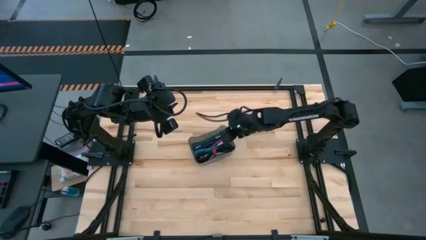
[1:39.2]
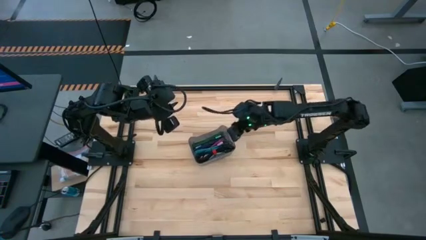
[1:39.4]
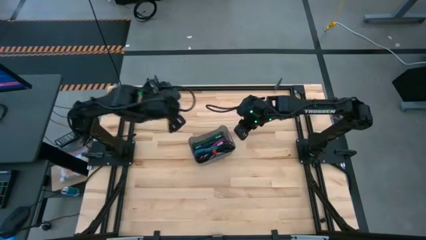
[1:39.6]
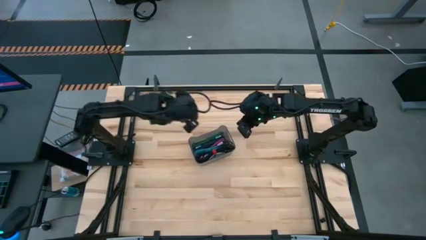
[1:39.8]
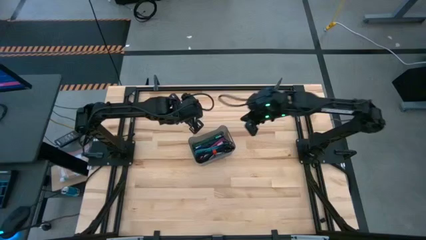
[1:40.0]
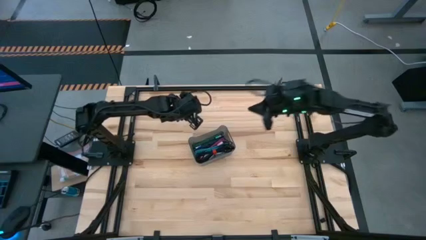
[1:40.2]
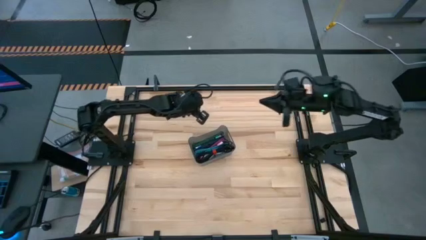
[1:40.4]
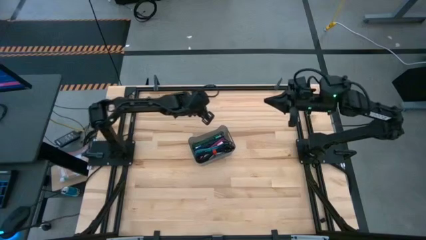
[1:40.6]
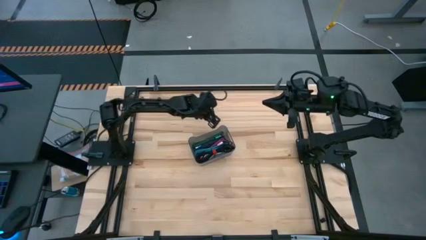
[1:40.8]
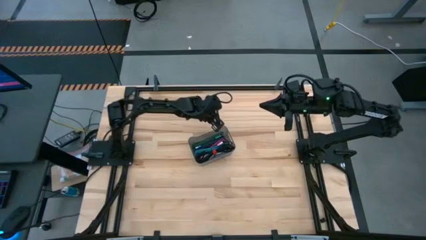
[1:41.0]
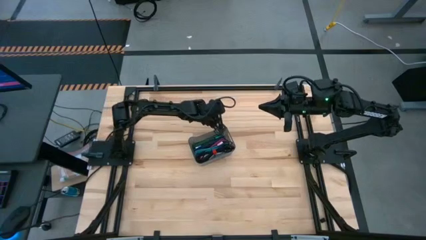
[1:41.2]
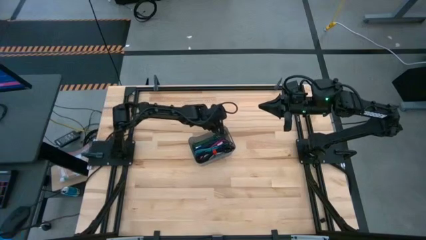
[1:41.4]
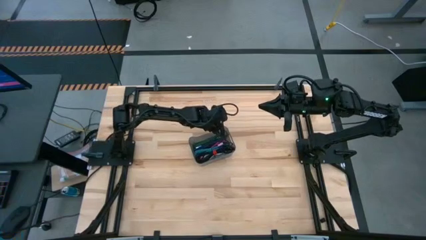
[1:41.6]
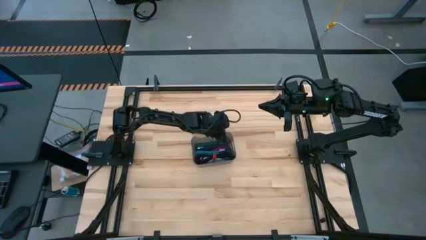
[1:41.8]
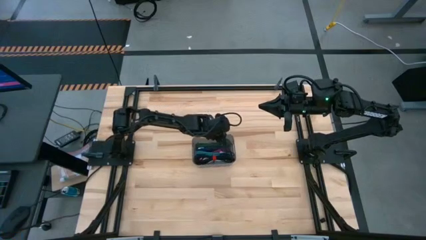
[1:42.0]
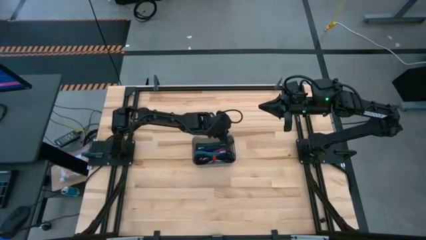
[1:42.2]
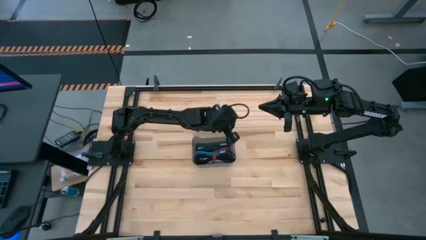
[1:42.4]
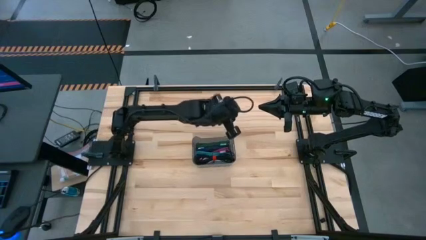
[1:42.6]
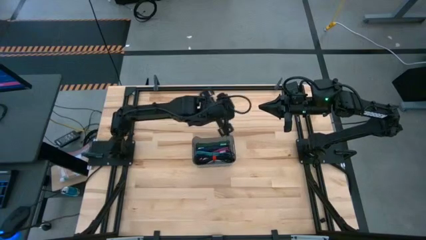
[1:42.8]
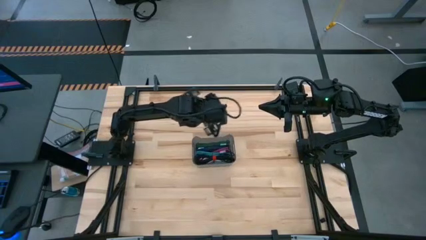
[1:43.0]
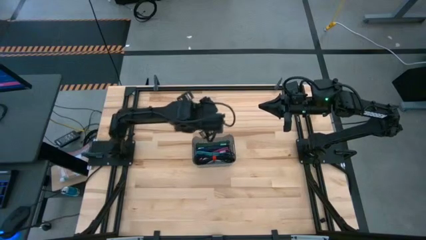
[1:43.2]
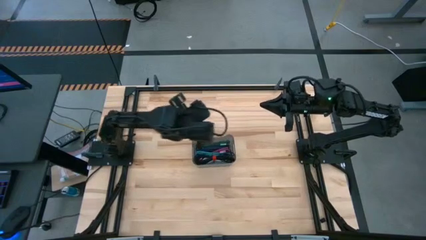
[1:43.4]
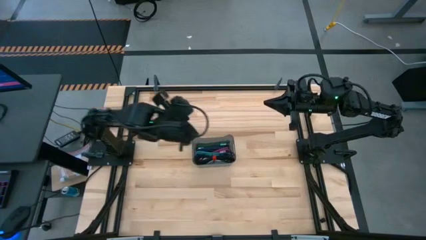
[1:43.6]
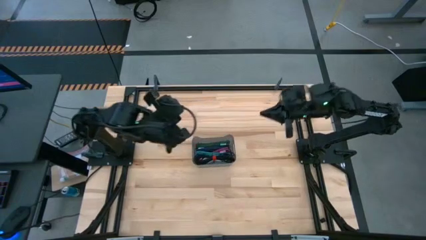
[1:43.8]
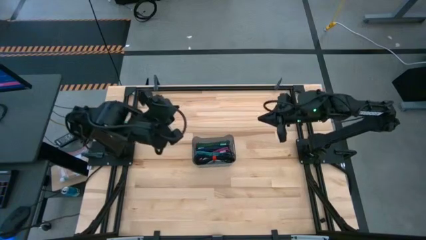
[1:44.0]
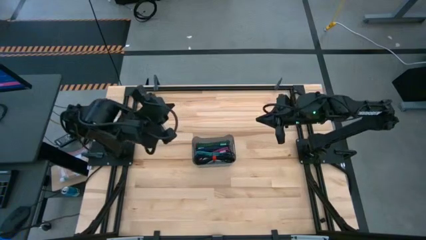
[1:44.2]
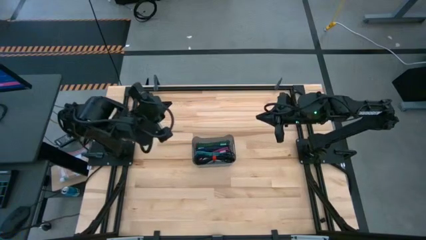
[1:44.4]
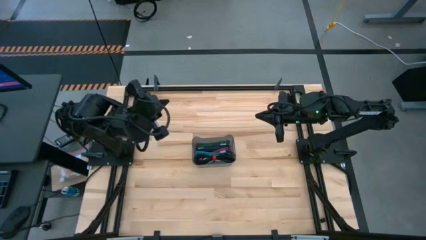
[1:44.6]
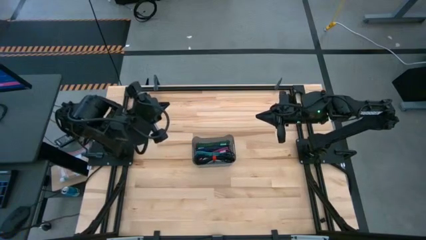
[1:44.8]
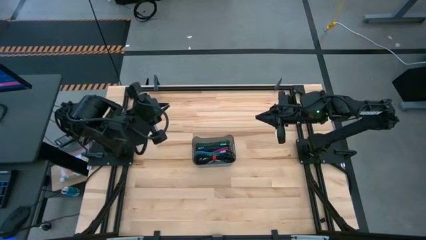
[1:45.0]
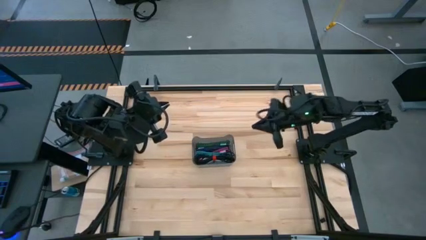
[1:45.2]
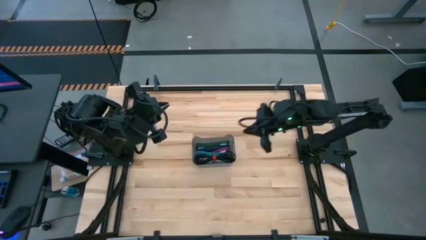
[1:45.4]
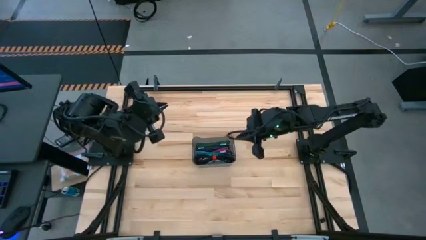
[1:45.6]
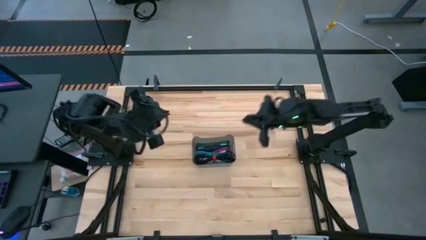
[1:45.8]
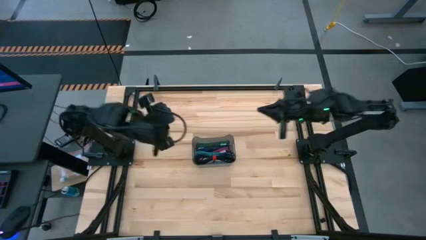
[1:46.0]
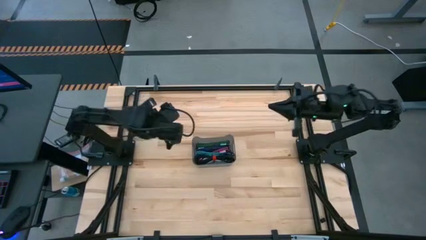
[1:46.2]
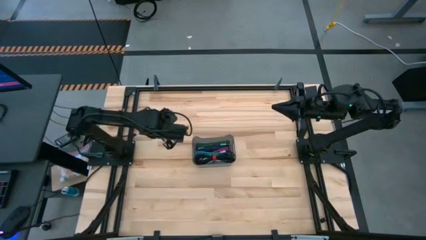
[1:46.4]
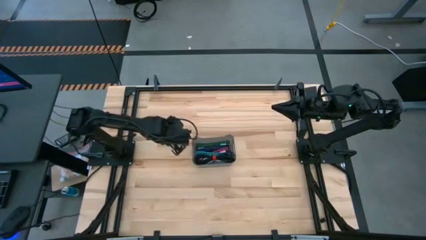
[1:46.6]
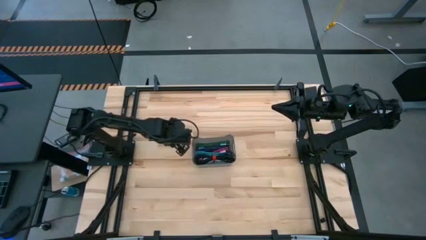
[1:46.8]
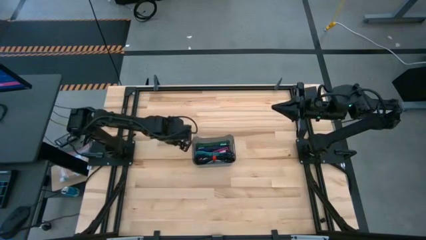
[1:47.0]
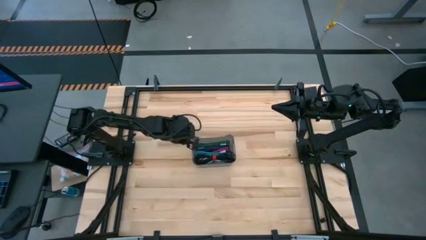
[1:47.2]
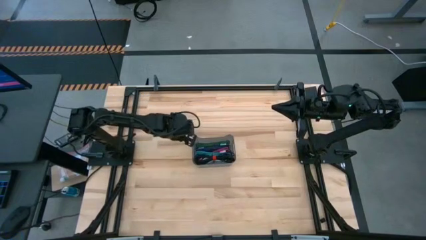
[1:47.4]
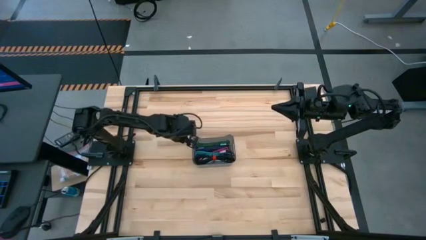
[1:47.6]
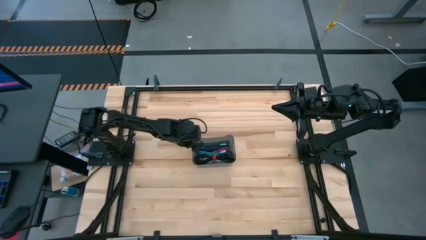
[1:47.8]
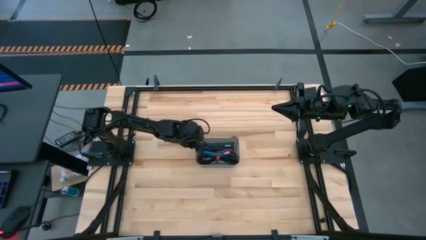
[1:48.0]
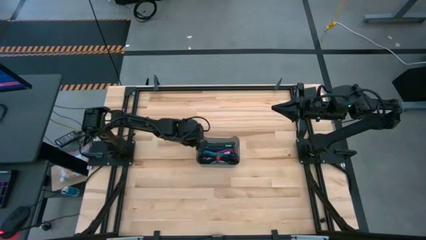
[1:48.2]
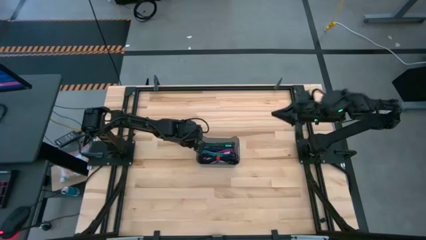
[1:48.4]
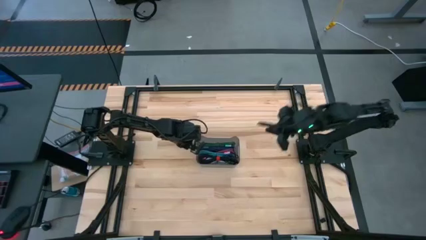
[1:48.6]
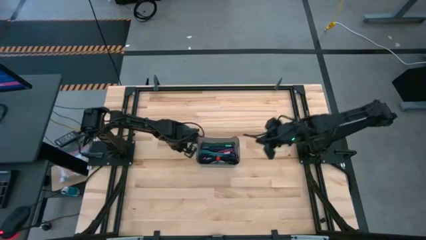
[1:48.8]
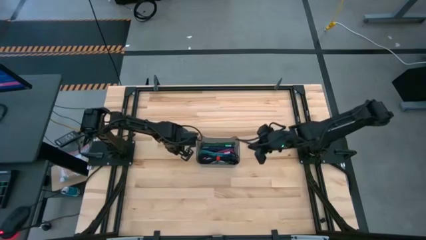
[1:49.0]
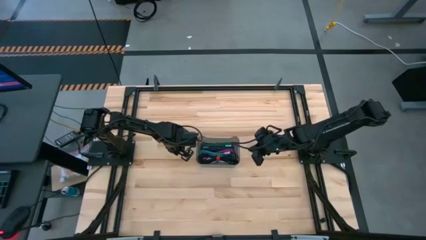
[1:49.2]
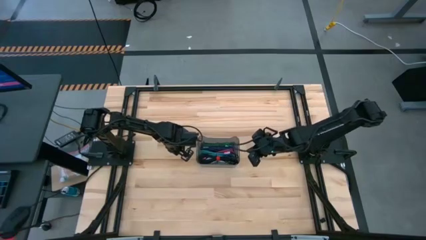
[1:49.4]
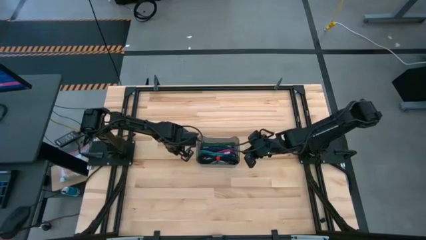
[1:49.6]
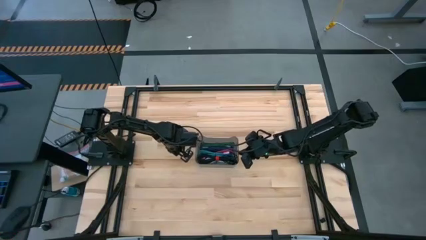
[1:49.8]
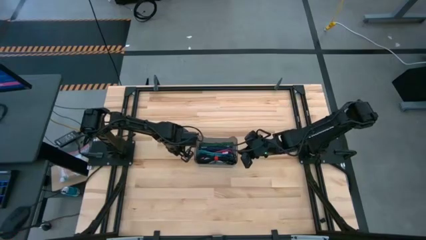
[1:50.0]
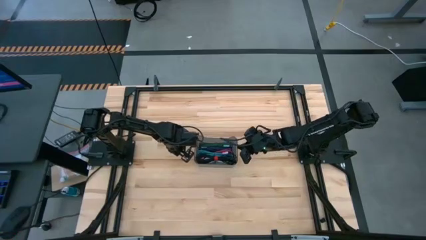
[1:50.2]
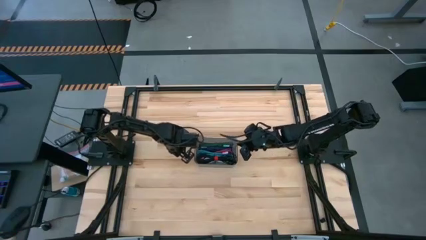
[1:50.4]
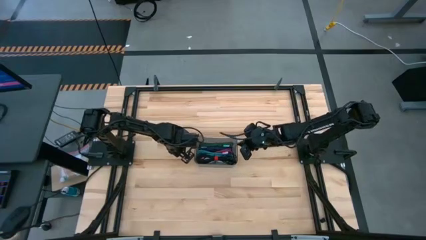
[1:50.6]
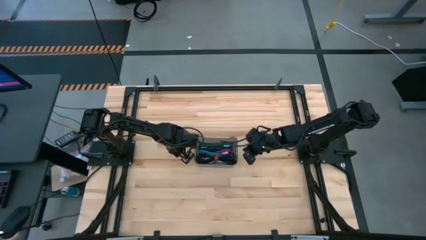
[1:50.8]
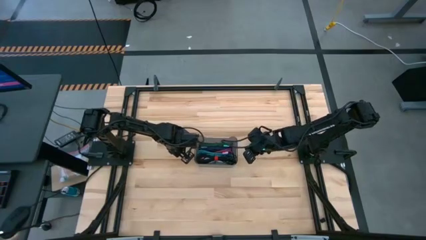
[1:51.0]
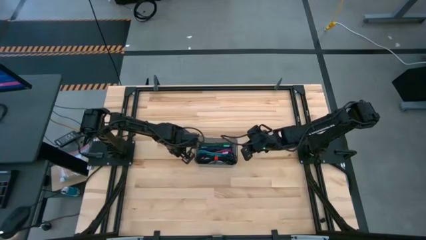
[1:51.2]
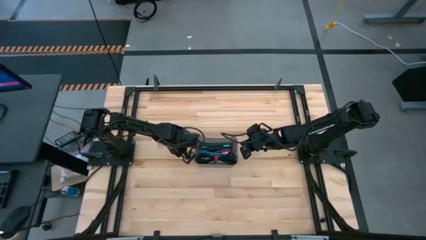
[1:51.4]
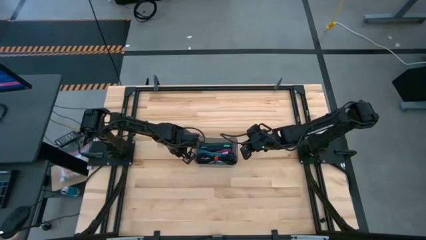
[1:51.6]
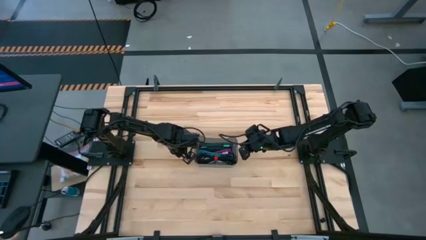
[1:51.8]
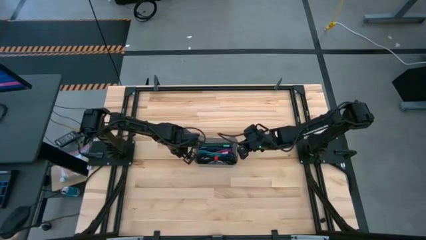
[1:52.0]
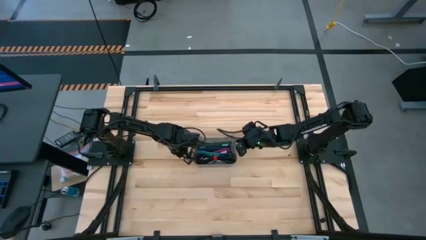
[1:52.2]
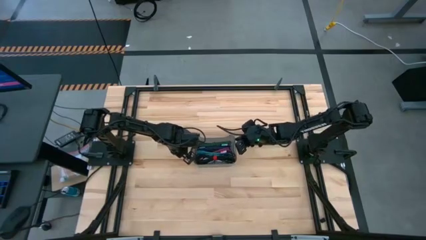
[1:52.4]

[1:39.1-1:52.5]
Task: Pick and place USB-C Cables
Adjust the black bin

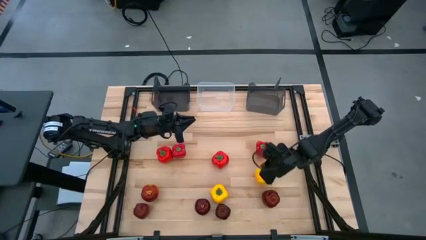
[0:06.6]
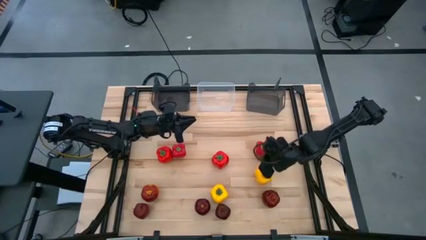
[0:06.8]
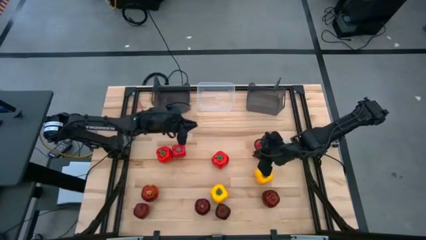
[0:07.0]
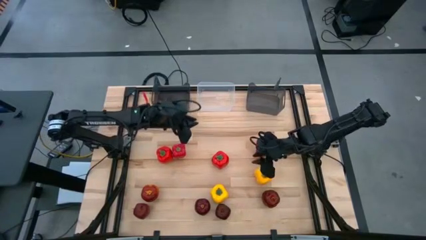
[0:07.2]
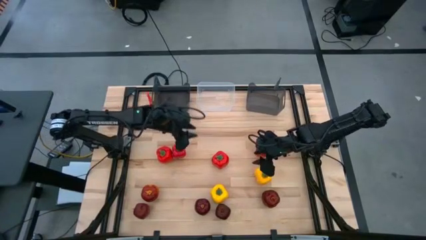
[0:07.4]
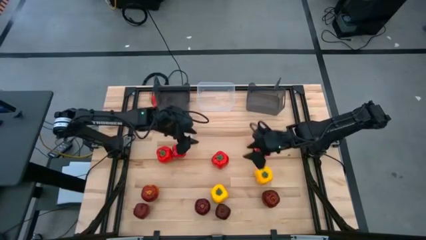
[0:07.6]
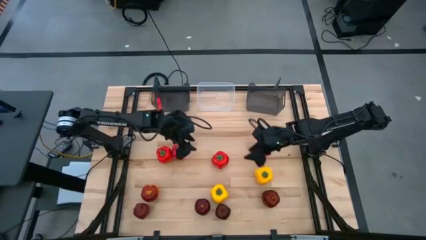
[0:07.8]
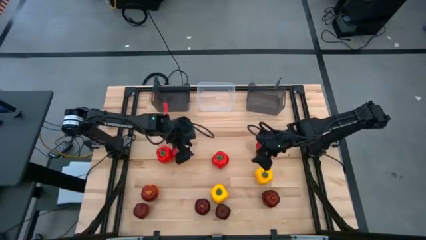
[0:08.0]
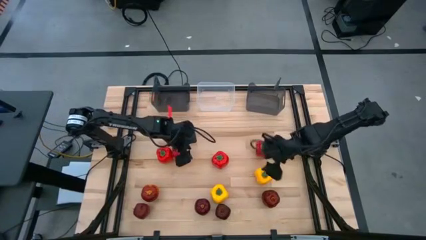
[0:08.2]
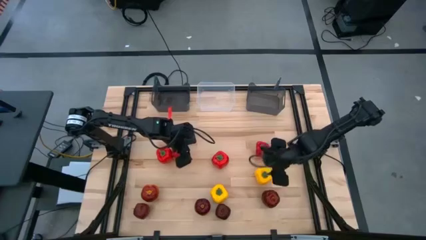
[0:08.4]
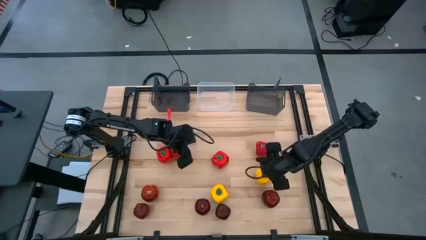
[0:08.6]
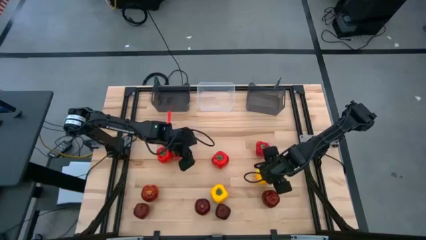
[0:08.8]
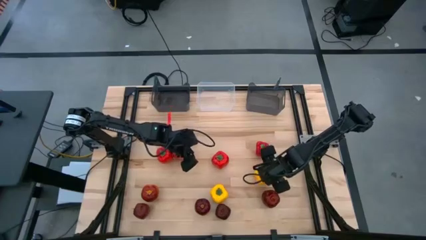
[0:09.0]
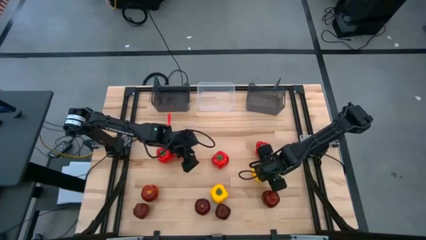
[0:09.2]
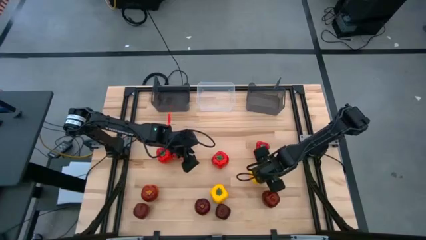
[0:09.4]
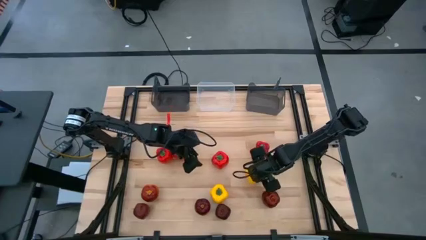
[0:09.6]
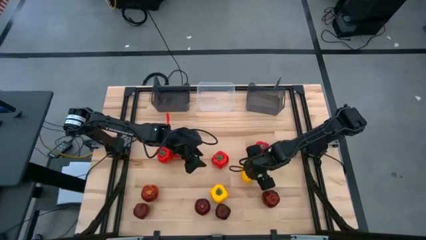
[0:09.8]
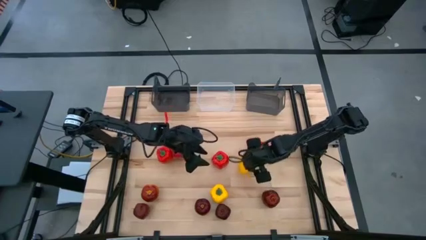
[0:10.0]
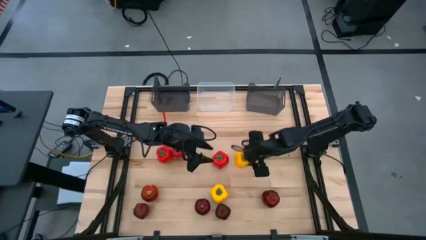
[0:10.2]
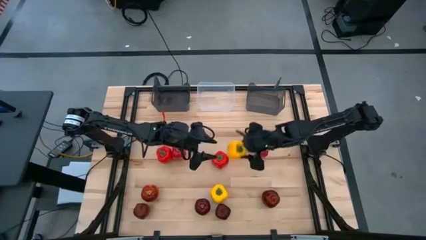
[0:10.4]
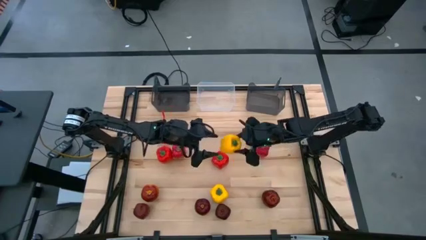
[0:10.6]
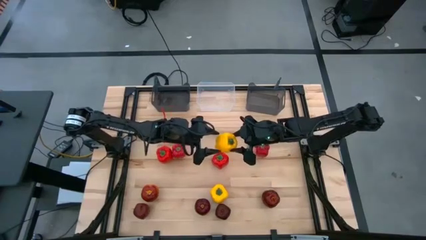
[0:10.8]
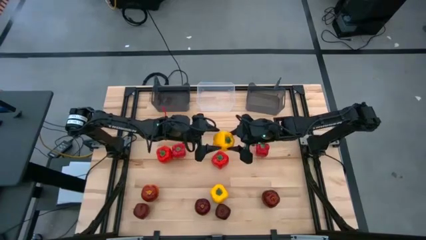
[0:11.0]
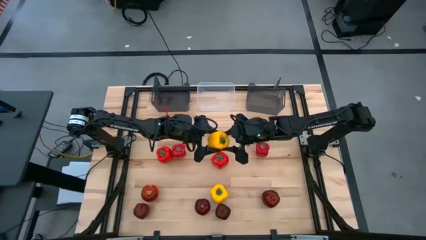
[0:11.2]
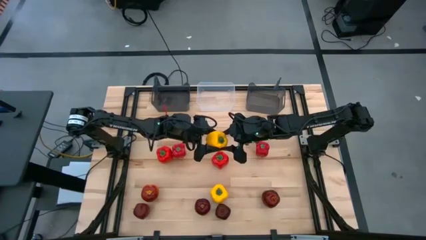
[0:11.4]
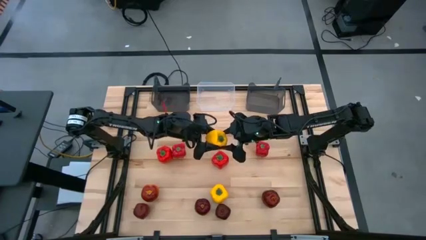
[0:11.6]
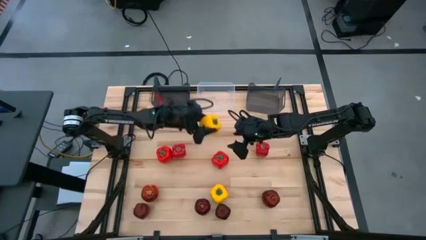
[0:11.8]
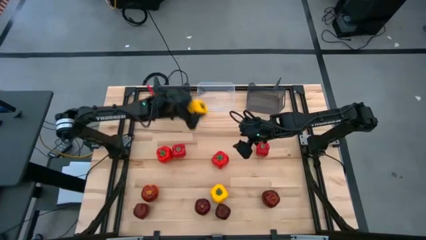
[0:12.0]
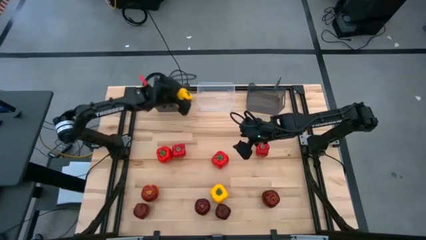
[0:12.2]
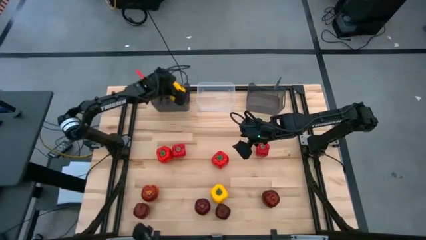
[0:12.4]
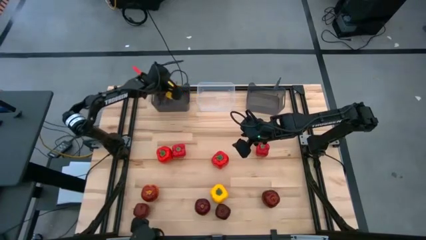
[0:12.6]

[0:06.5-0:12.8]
Task: Sort produce into baskets
Put the right yellow bell pepper into the left black bin
